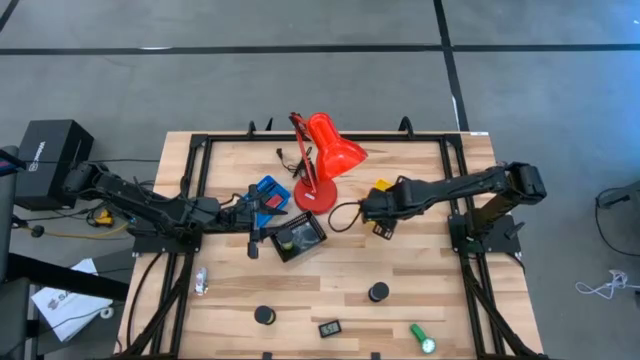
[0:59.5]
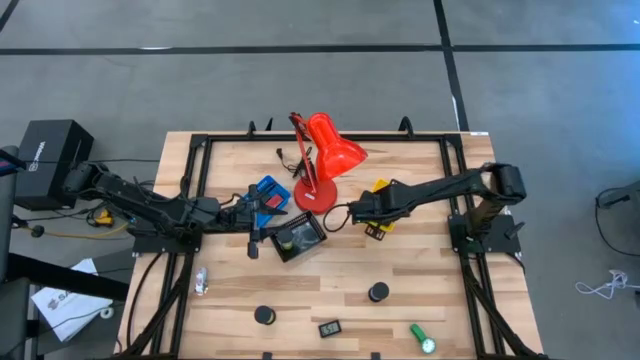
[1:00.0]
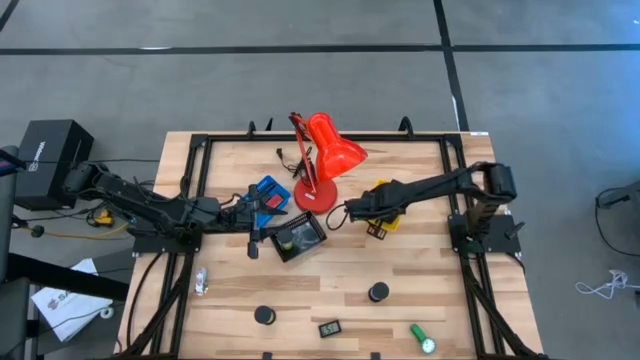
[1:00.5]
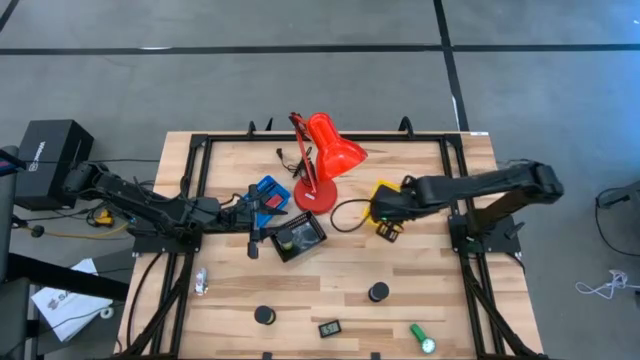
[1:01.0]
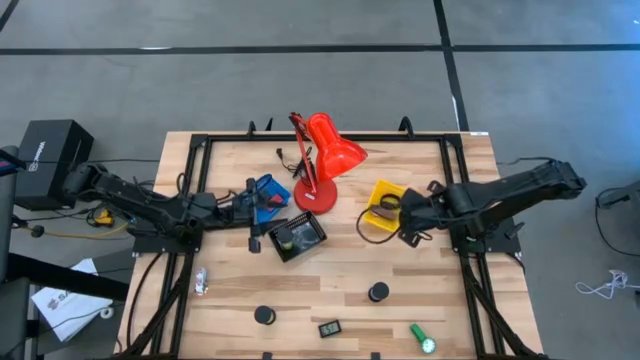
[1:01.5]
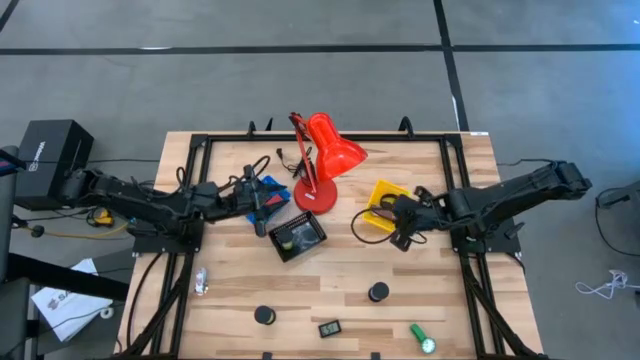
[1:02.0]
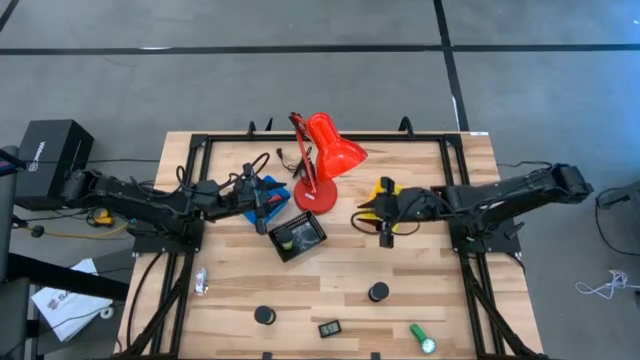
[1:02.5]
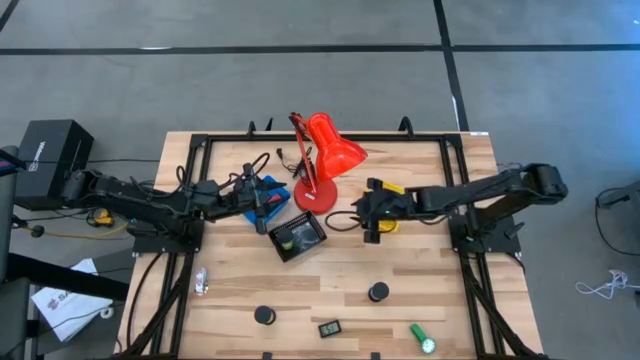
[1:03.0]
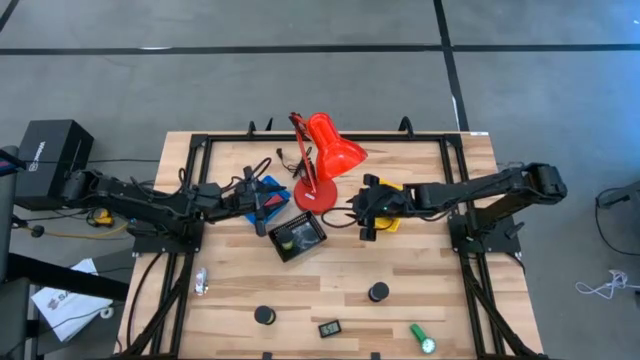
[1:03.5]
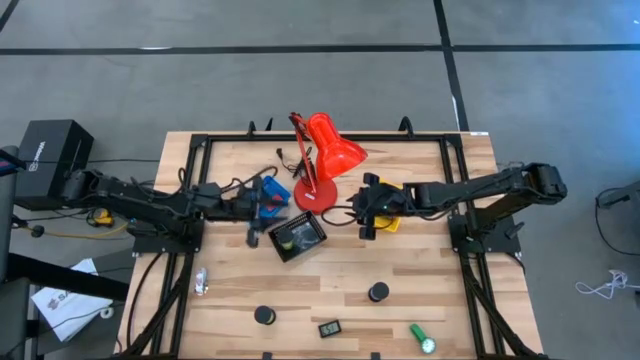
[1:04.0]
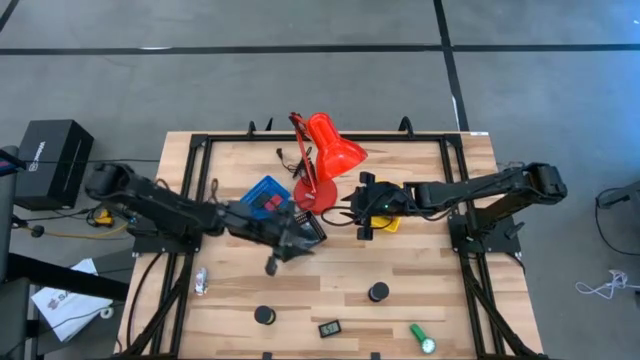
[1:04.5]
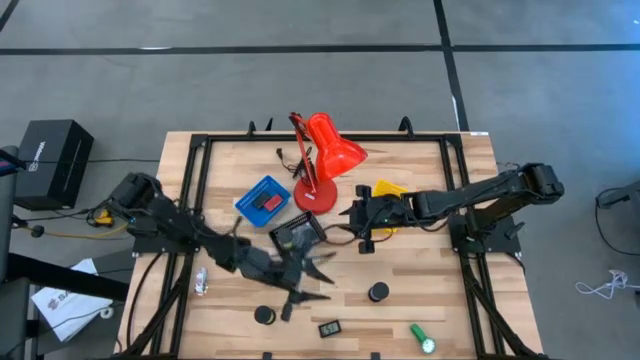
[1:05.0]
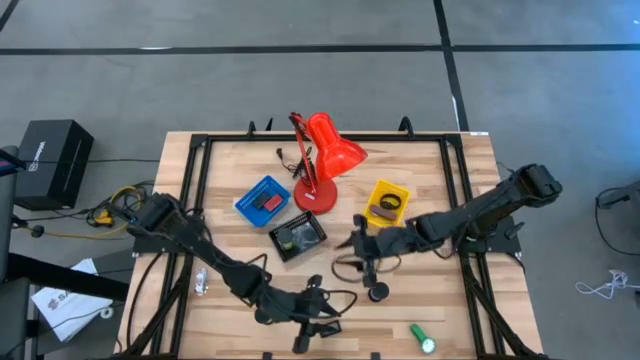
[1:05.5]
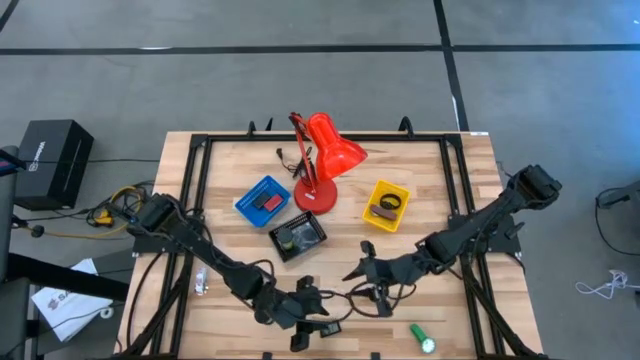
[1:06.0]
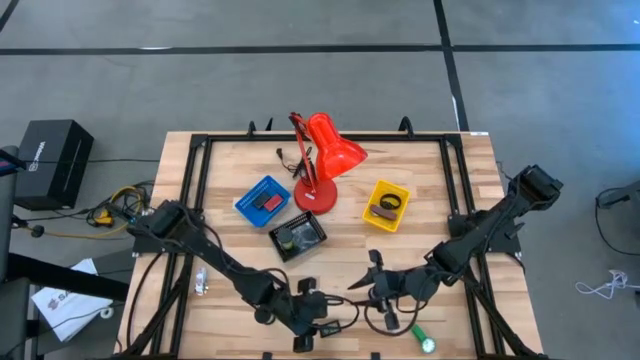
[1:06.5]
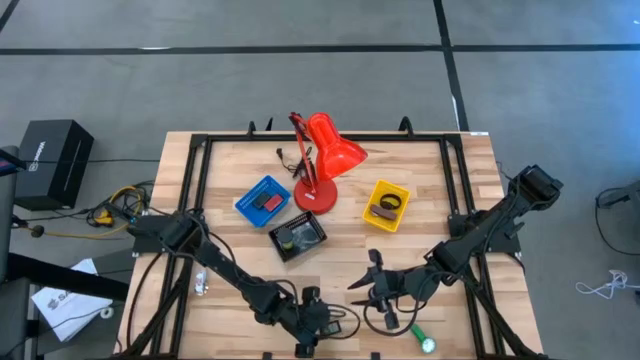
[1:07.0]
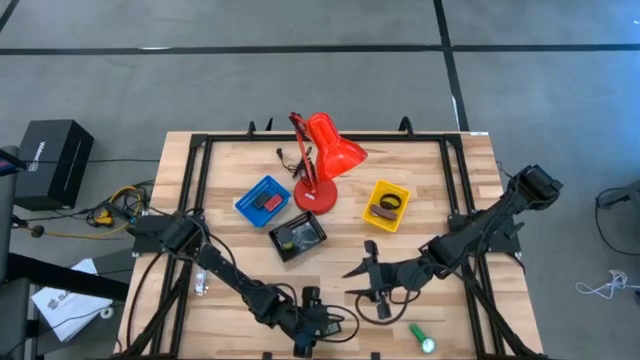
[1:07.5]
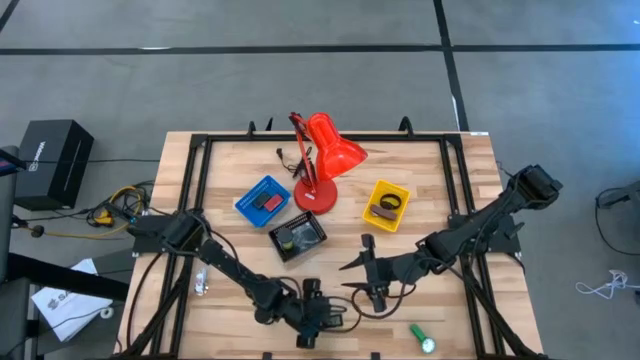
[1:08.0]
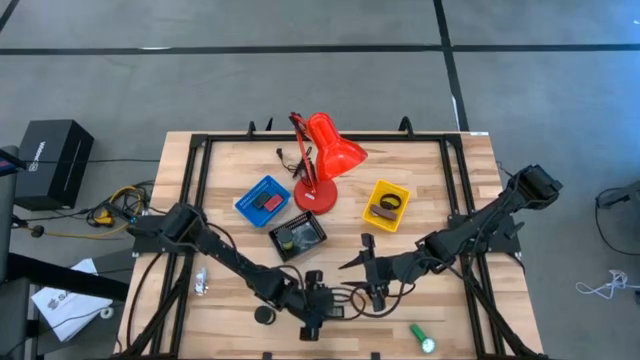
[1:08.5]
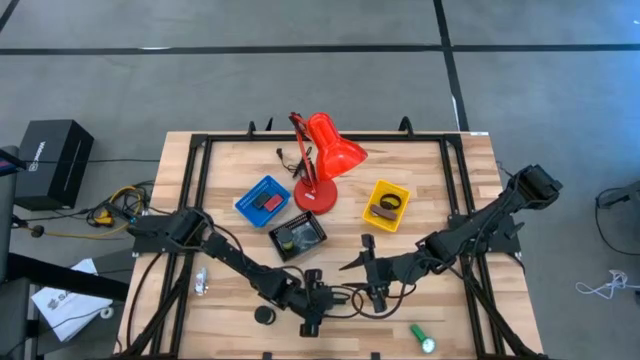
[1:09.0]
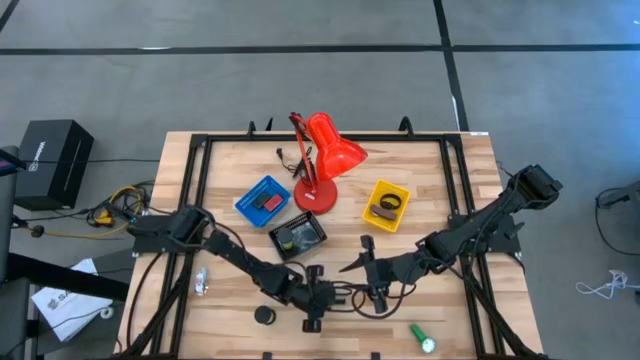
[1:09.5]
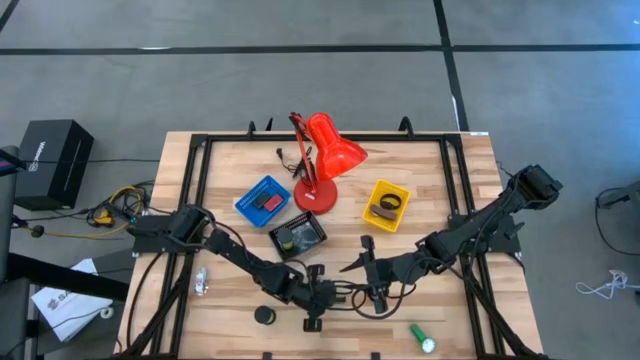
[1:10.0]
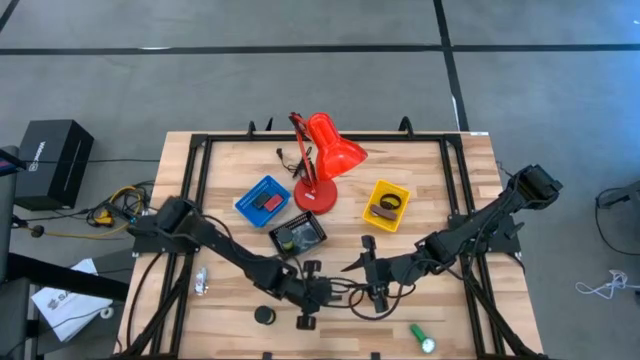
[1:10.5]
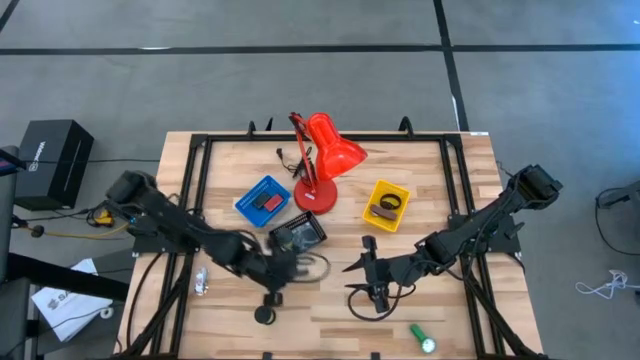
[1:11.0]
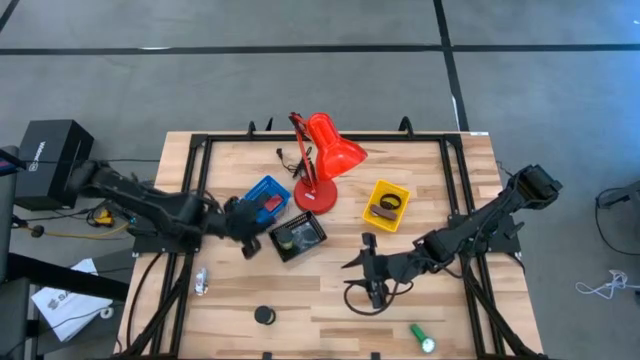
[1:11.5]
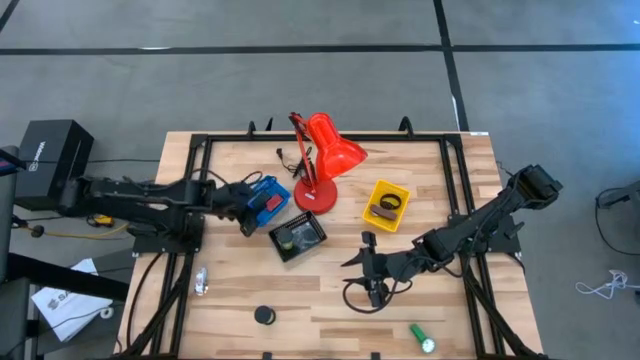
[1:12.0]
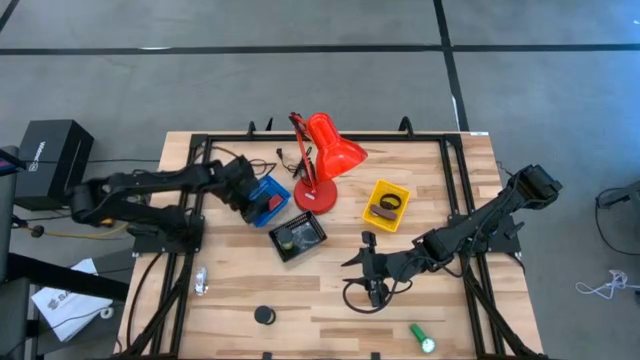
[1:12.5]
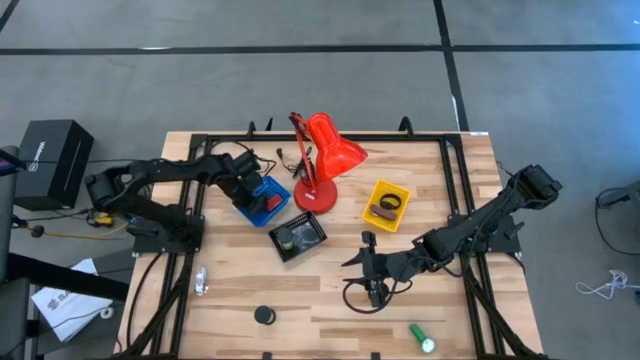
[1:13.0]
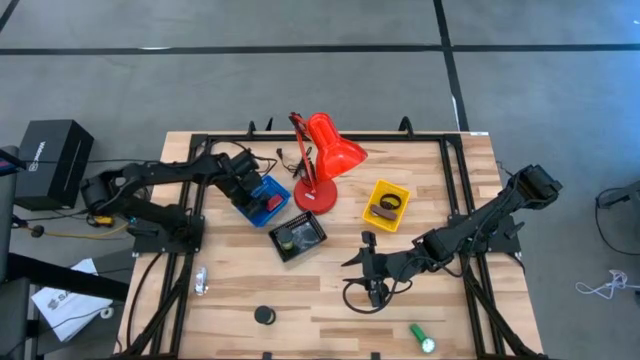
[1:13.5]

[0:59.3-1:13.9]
Task: Pick & Place Office items
Put the black timer into the blue bin

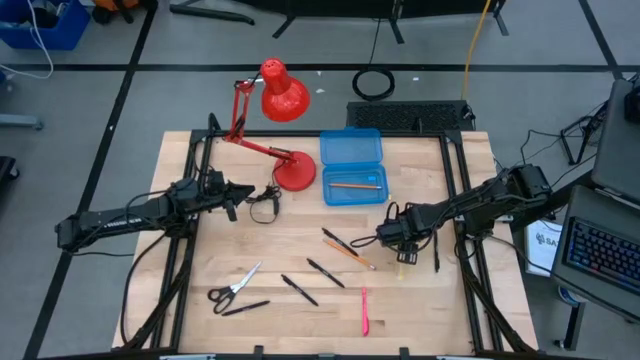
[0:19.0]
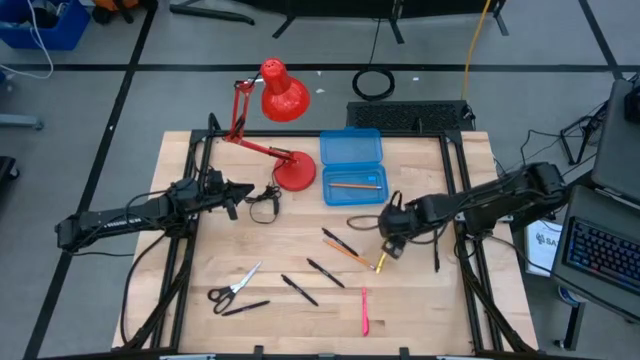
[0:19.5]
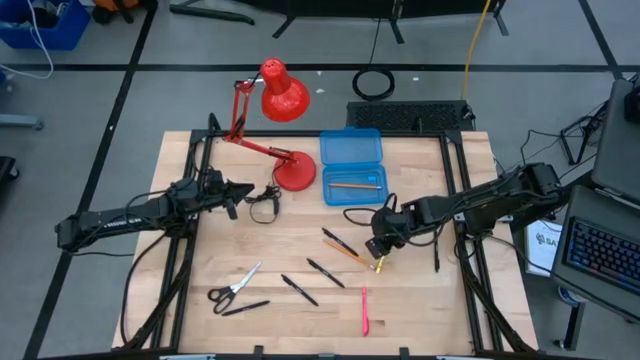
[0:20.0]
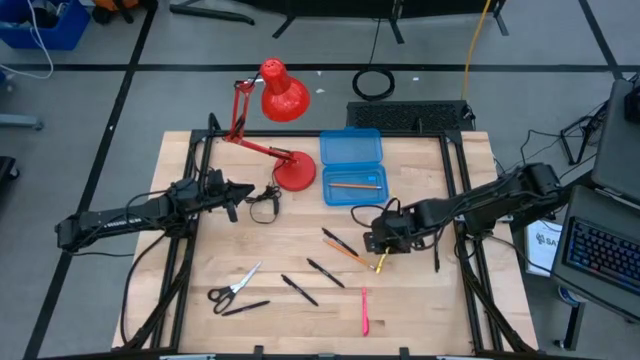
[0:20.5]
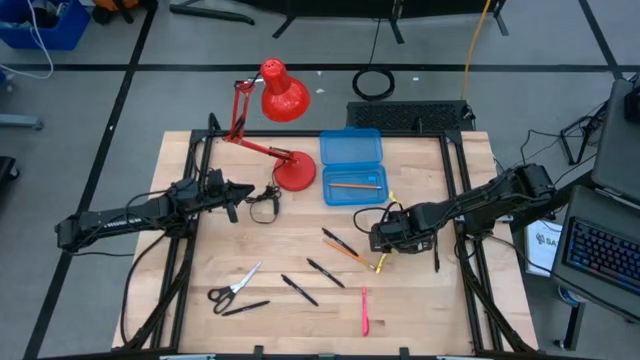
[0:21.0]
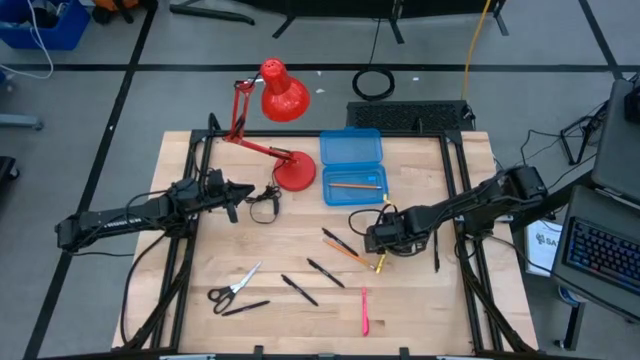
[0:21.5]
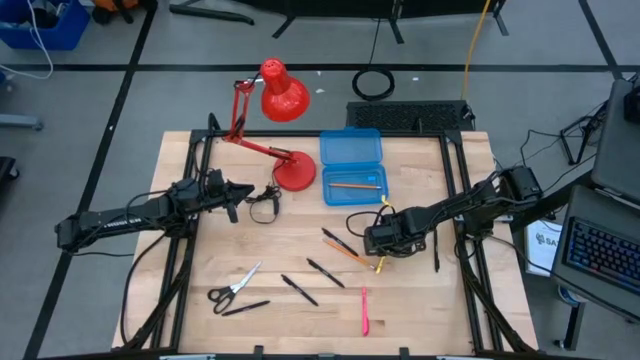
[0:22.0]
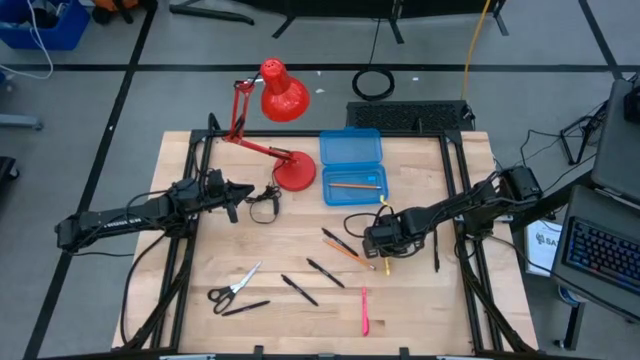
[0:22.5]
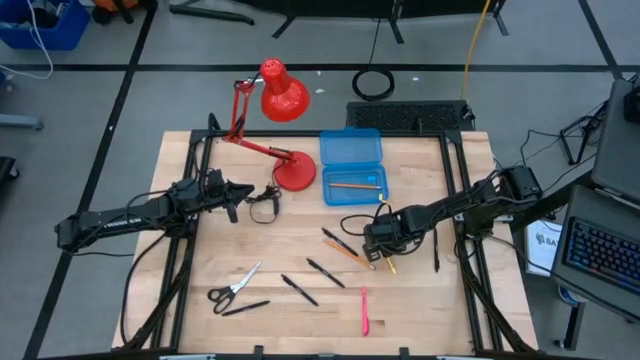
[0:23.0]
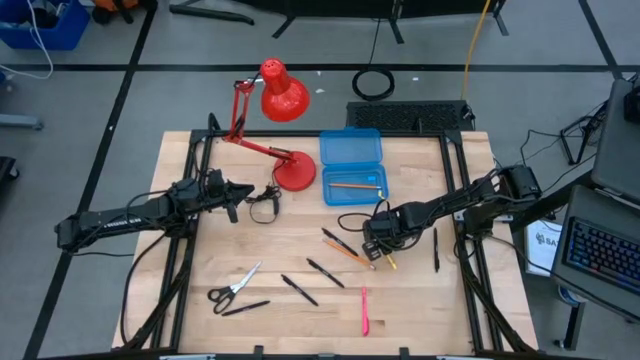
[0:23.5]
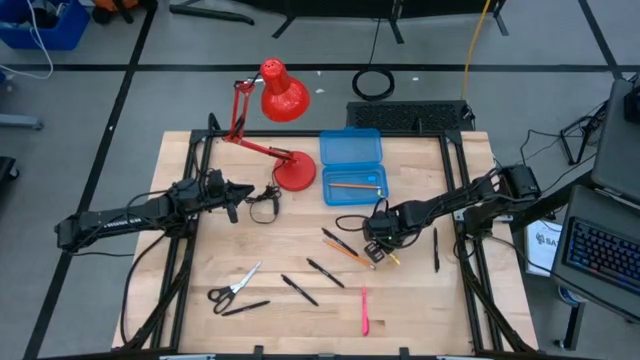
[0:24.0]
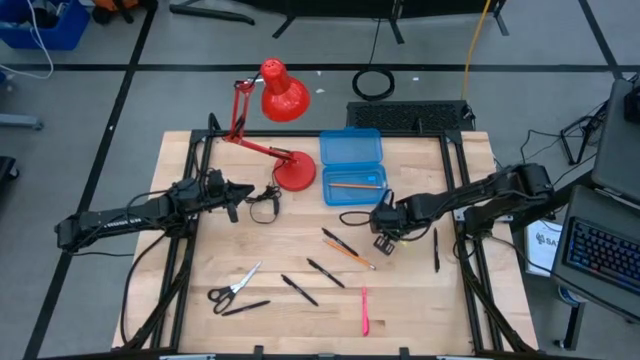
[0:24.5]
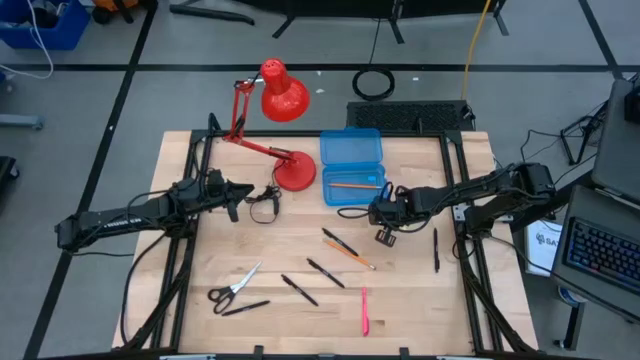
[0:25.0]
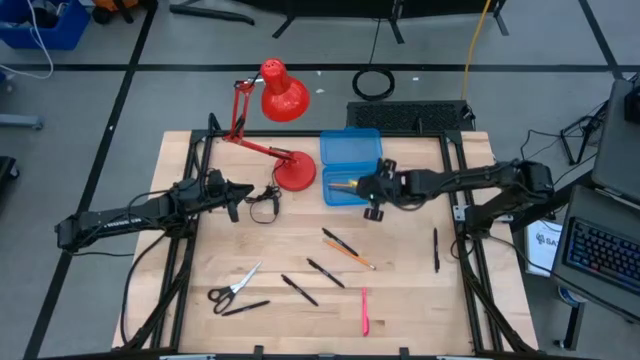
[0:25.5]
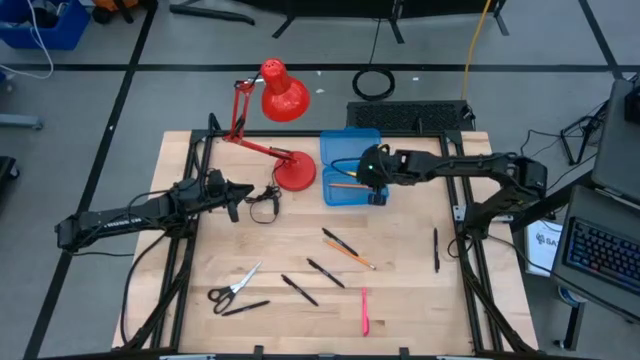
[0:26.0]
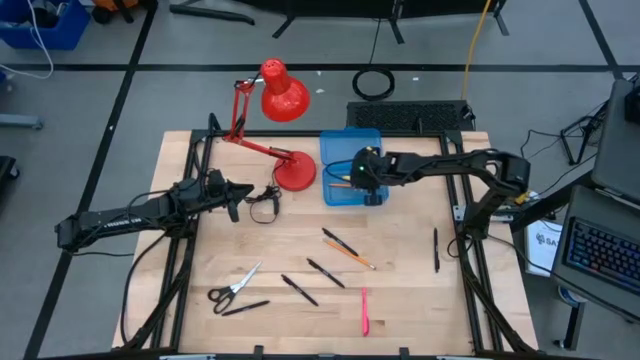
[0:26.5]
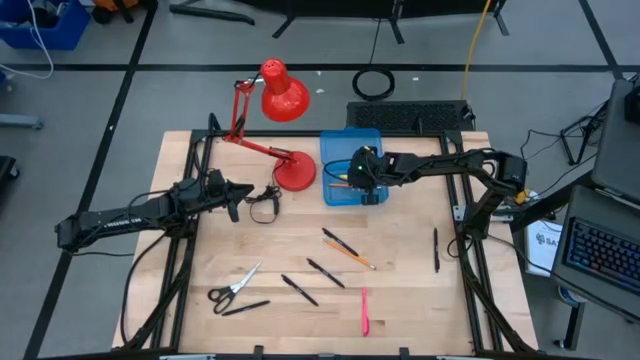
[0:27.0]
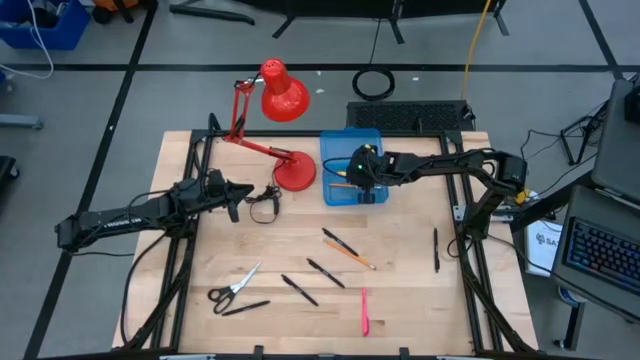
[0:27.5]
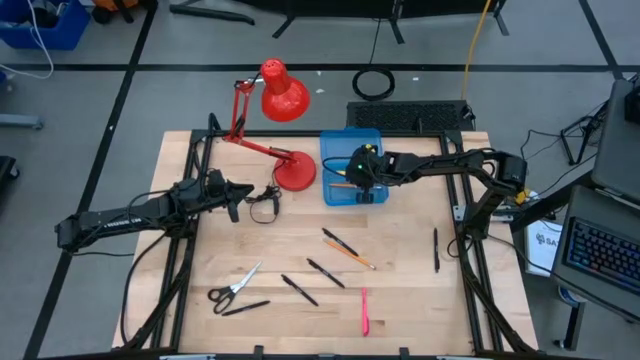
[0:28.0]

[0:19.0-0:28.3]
Task: Pick & place school supplies into a supply box
Put the yellow pen into the blue supply box
